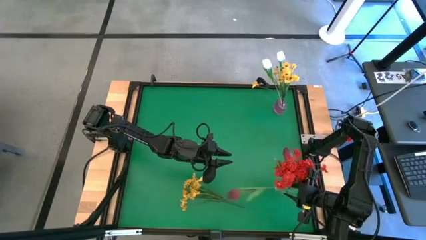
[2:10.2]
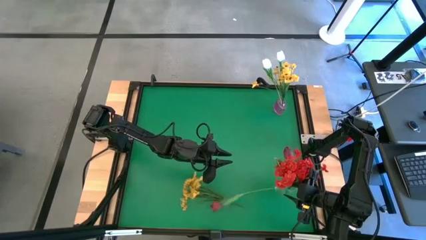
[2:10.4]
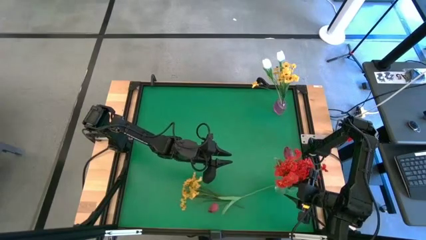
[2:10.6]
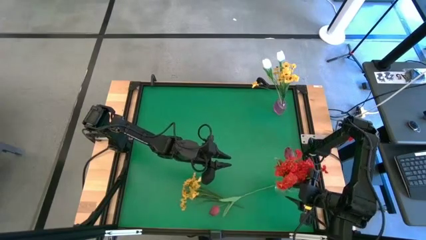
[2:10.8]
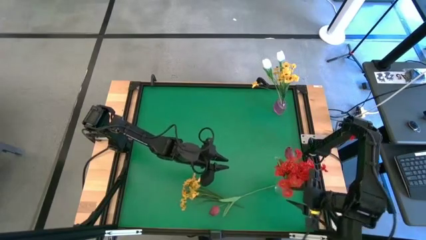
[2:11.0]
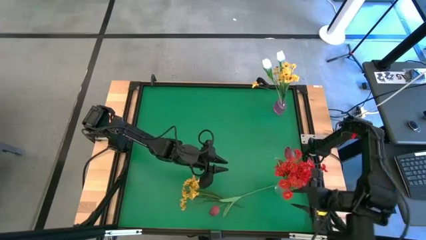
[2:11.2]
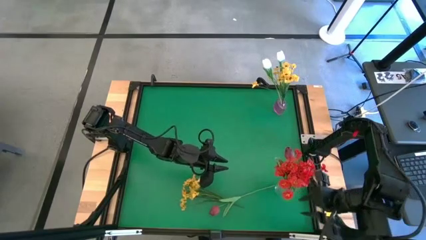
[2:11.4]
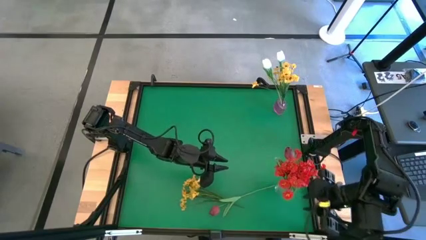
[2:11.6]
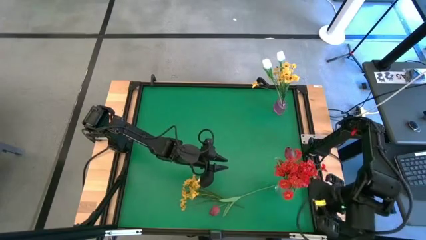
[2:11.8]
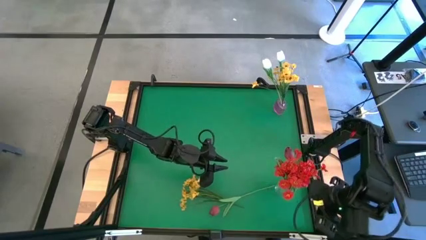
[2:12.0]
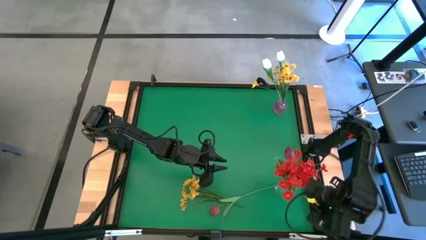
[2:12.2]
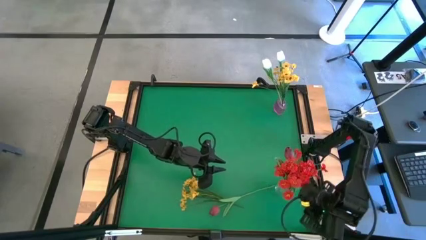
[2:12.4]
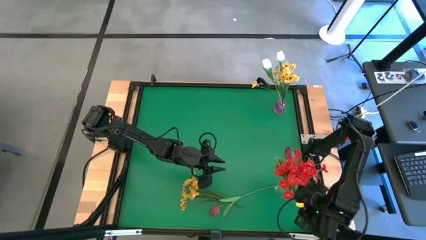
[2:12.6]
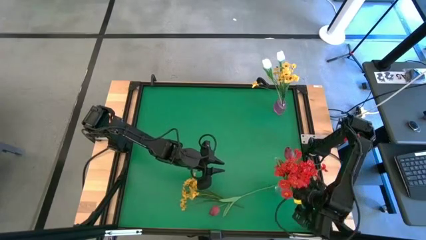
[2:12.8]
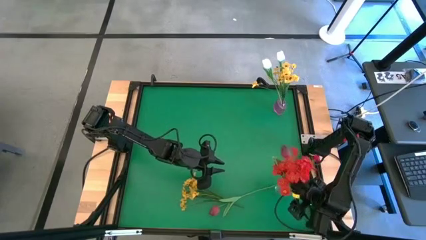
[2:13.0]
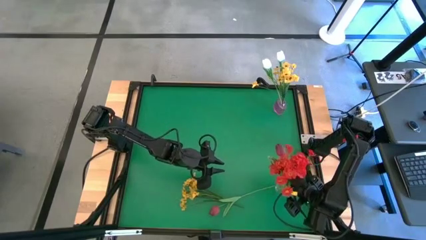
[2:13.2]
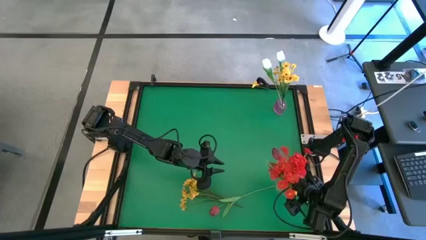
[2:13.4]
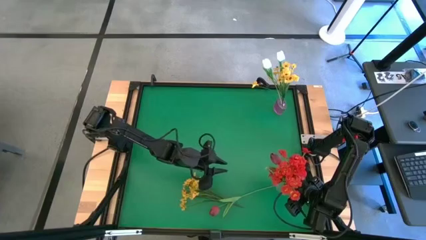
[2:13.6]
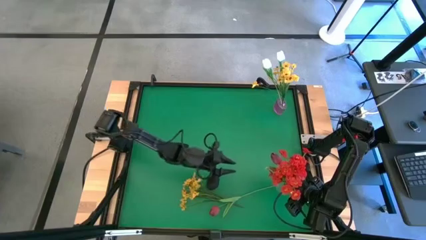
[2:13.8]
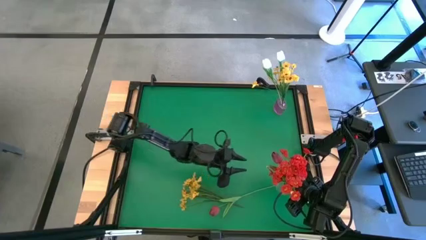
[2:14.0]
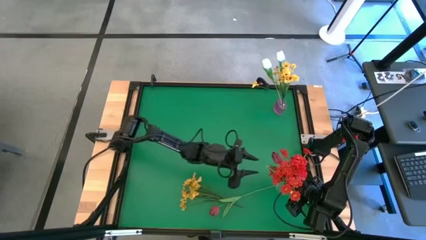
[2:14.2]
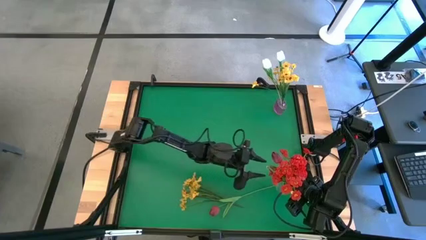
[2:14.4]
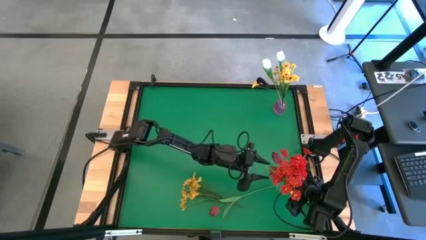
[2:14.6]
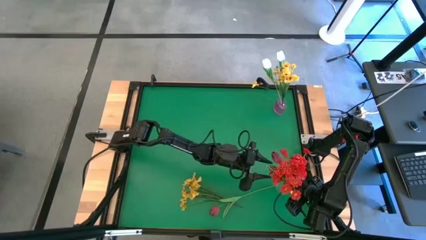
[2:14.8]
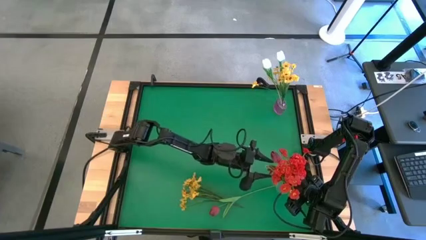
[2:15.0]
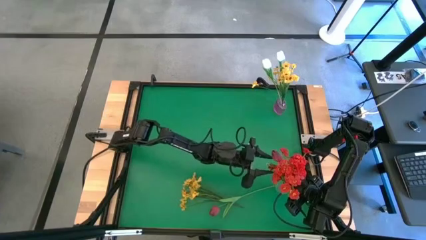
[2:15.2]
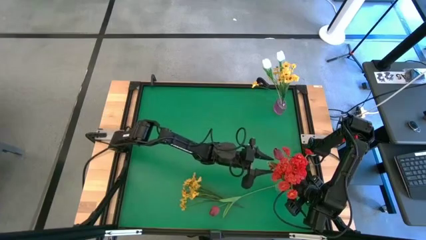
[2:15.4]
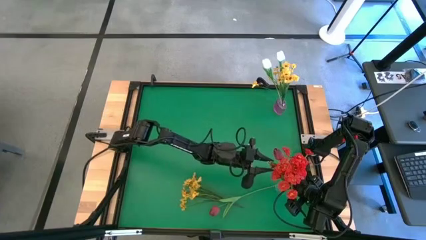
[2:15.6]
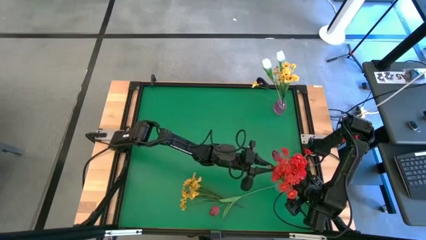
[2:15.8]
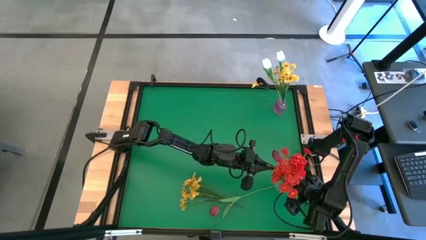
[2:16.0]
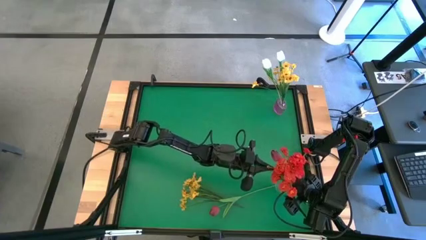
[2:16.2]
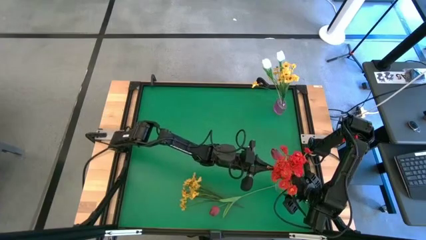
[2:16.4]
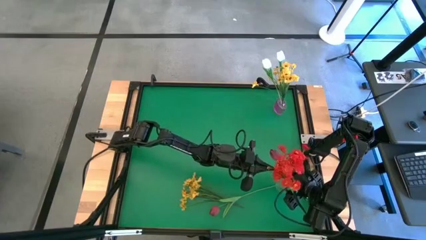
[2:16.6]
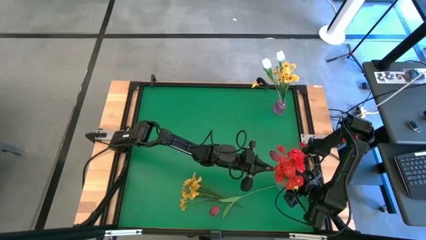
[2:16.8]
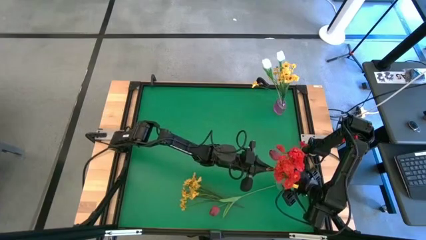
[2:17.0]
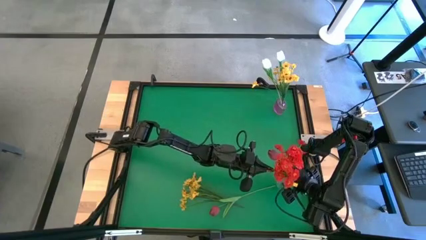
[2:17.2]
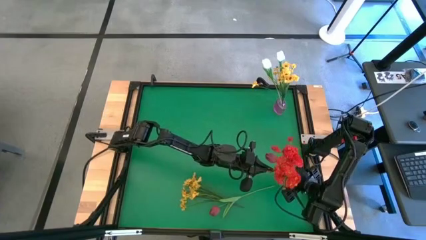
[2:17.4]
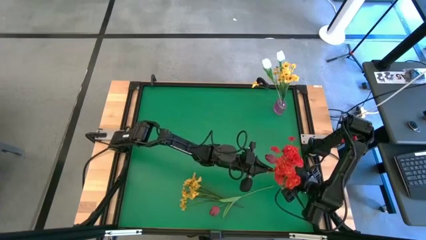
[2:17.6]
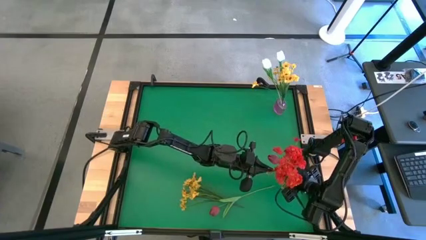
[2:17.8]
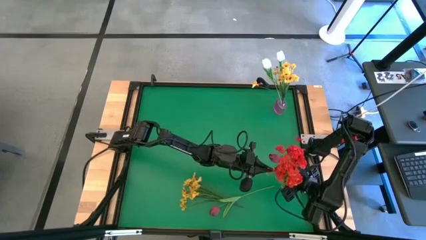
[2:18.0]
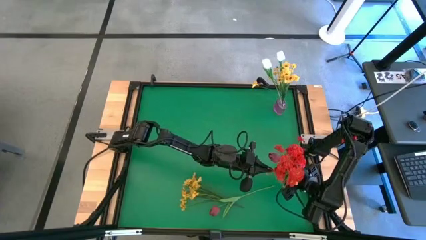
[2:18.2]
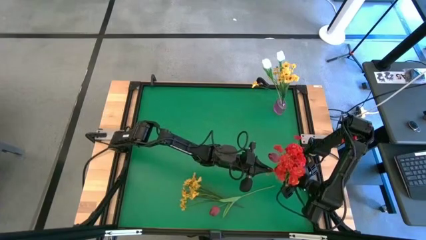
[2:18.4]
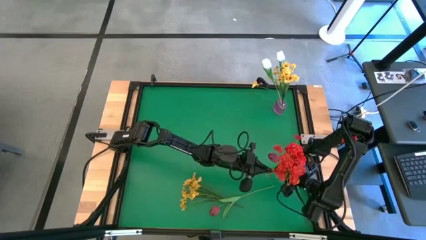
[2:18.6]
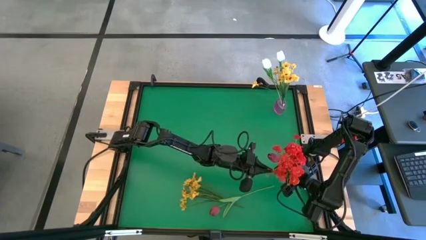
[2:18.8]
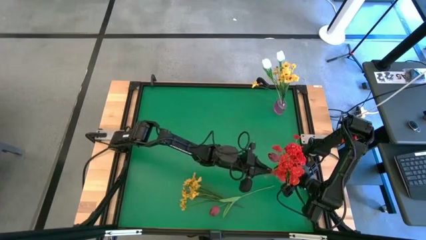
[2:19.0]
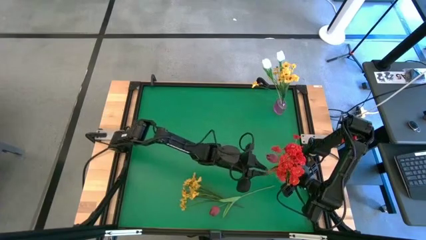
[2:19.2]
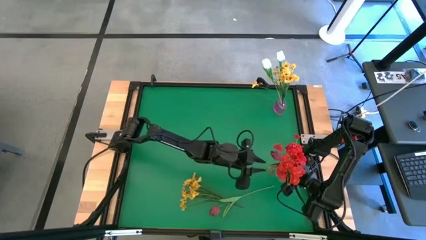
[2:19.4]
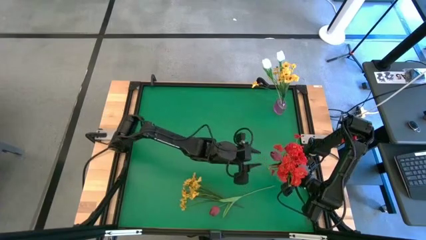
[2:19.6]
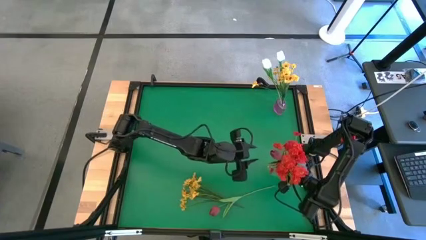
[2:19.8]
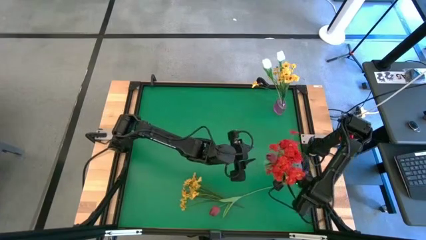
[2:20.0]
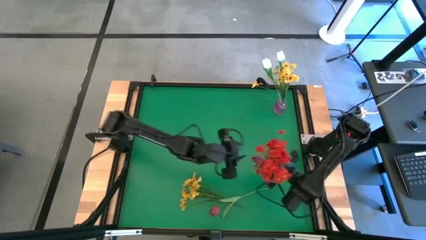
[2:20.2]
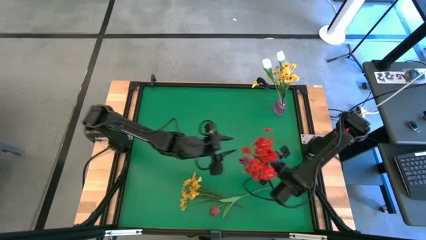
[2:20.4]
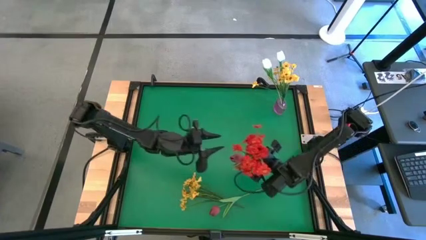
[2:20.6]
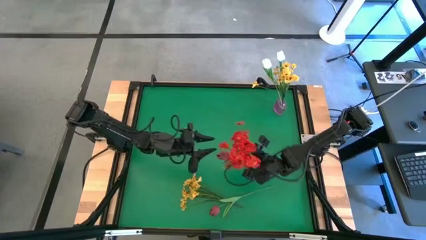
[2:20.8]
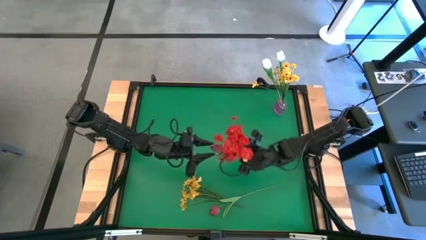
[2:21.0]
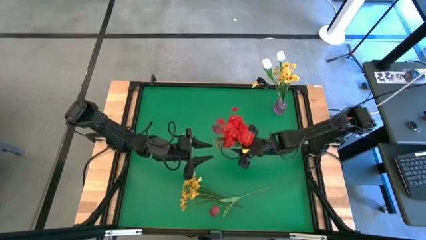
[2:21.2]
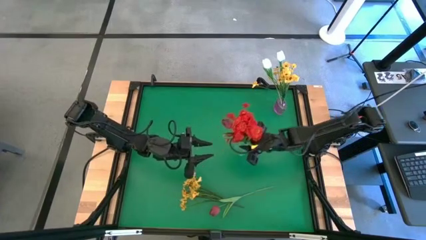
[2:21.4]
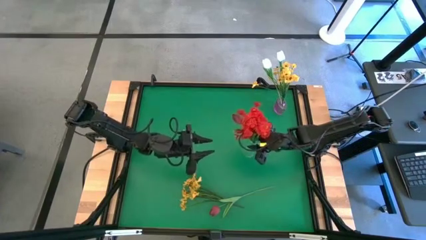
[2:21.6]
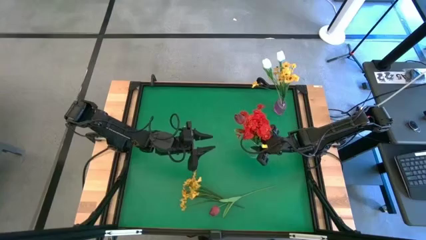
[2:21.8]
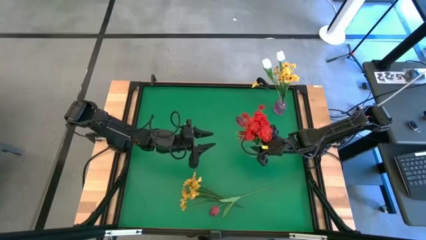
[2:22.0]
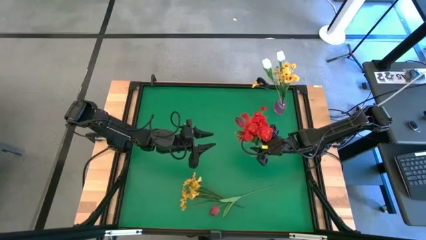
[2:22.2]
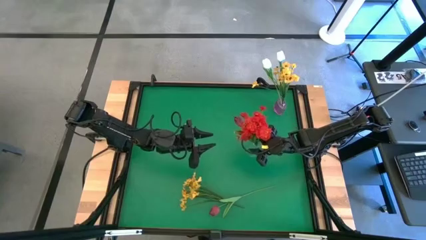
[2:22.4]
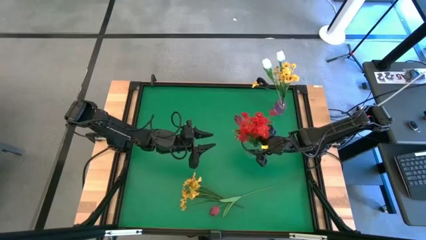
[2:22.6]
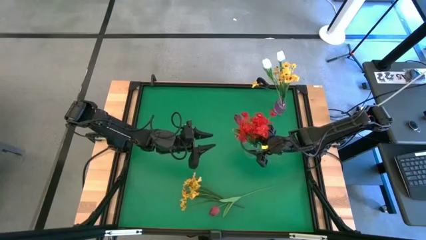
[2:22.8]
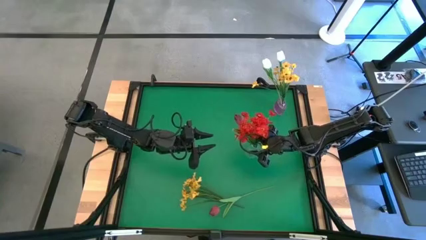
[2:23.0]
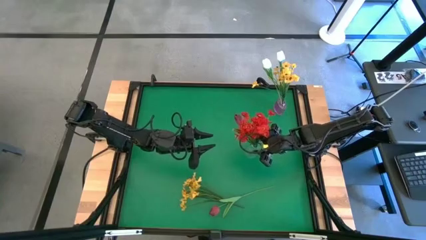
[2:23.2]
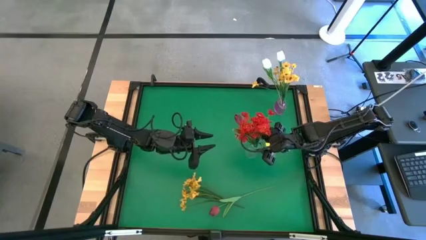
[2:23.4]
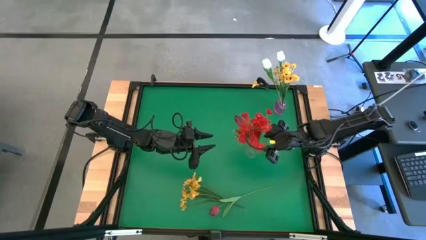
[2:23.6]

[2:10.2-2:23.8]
Task: Sort flowers into vase by color
Move the transparent vase to the center of the table

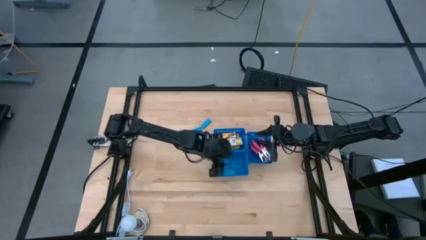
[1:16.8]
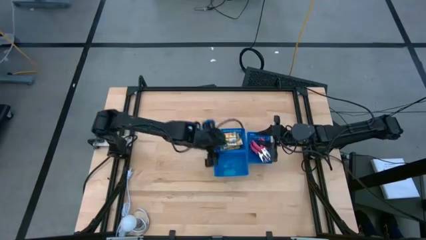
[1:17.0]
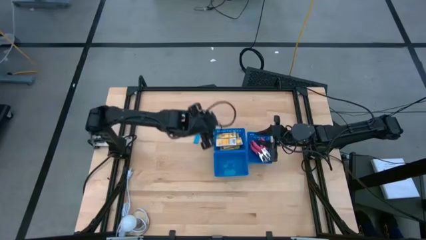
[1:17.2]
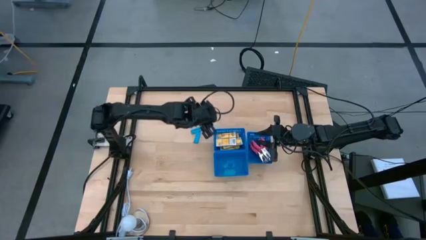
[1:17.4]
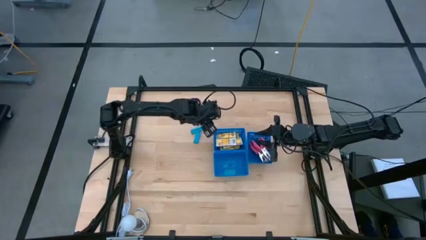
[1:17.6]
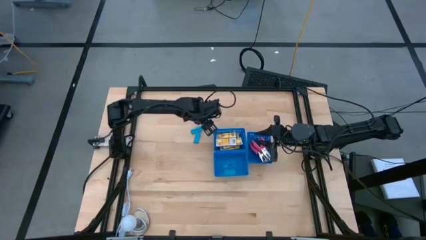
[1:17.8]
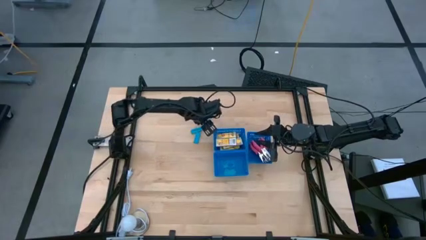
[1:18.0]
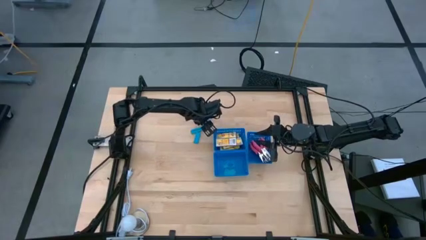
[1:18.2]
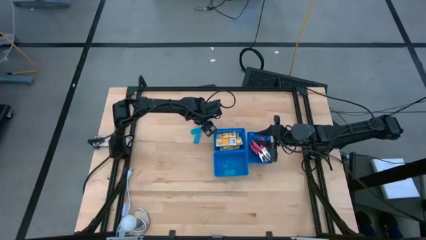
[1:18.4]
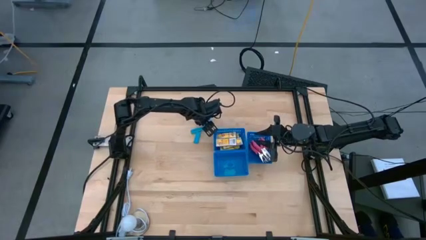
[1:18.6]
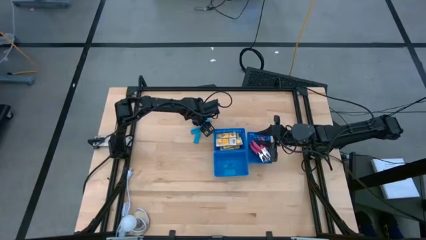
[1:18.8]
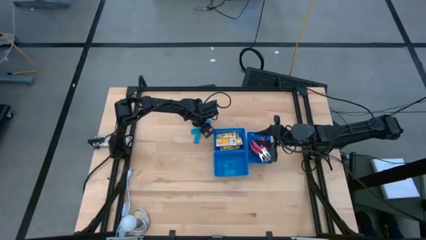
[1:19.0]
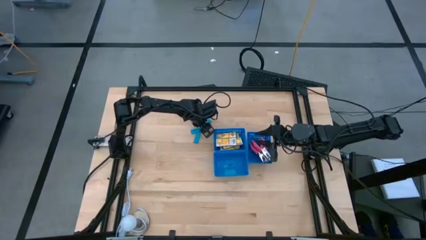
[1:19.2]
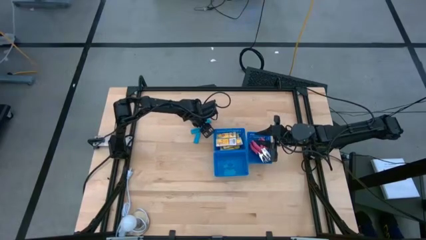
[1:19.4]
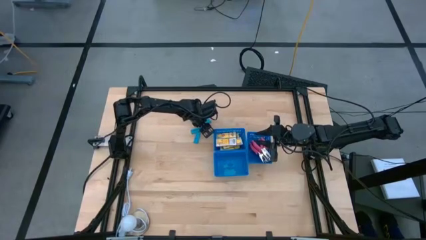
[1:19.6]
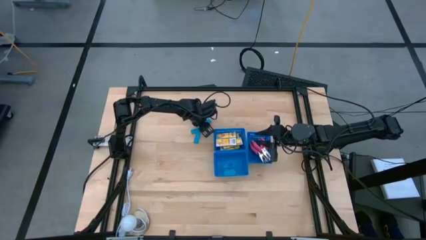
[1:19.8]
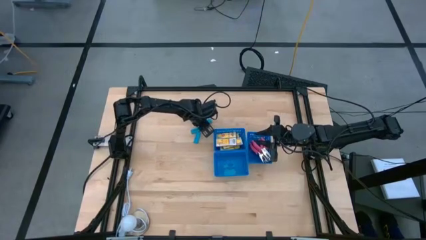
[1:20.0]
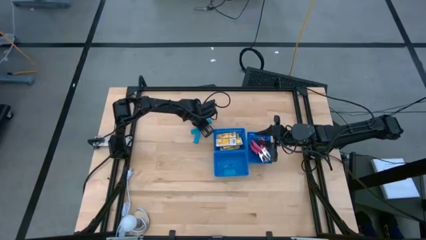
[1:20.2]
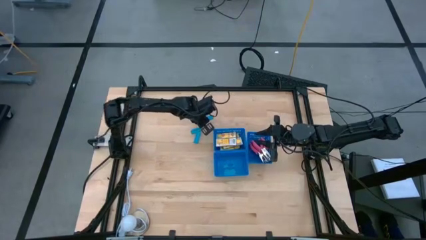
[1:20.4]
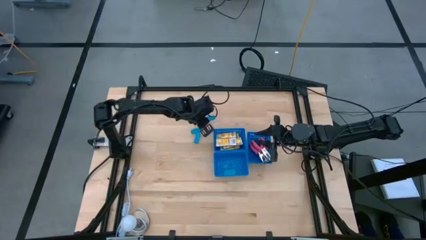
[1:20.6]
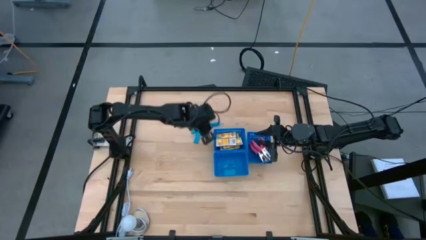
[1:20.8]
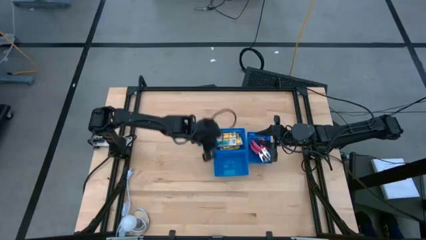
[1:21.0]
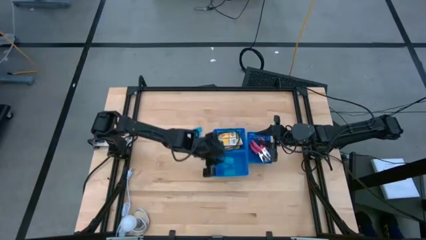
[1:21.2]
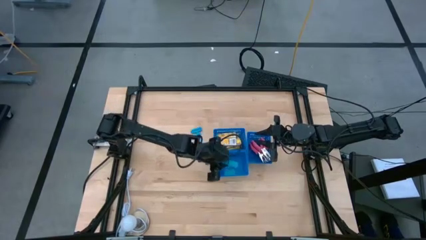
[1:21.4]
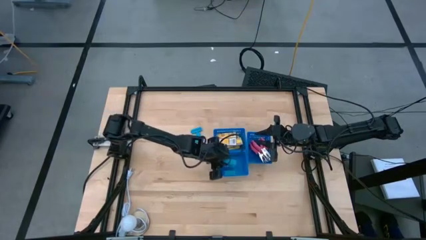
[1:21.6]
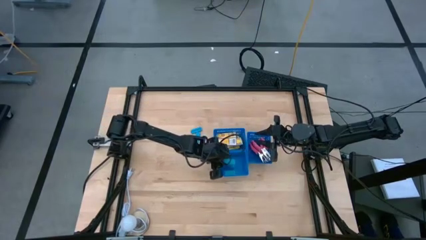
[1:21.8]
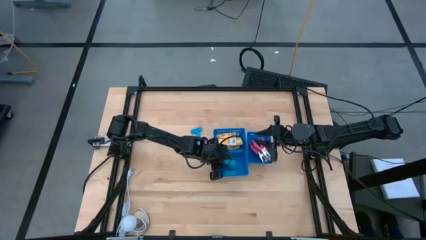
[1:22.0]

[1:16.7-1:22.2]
Task: Pick & Place School Supplies
Put the top blue eraser into the bottom horizontal blue bin
